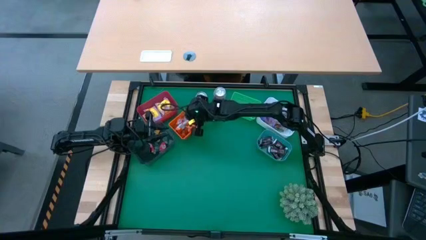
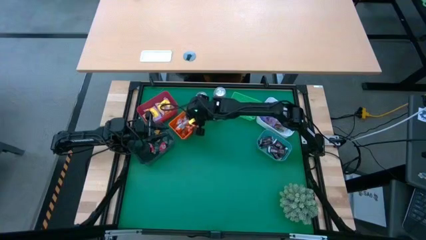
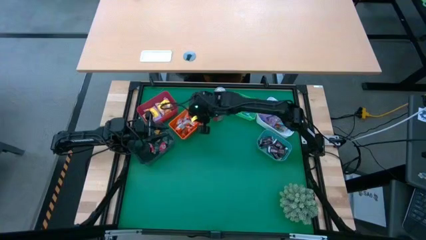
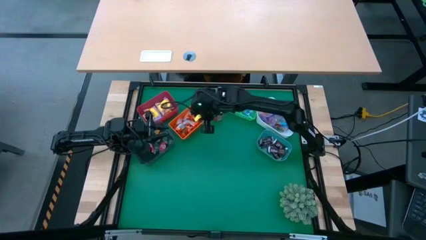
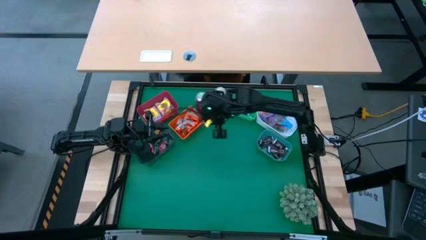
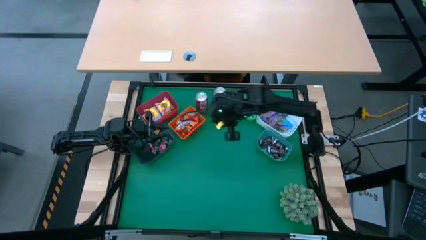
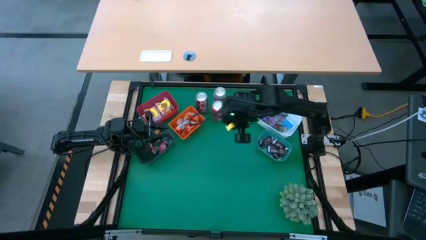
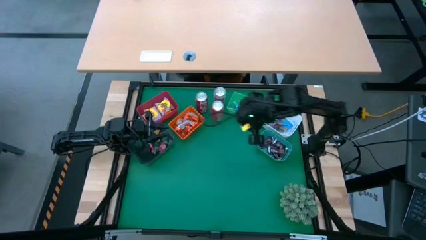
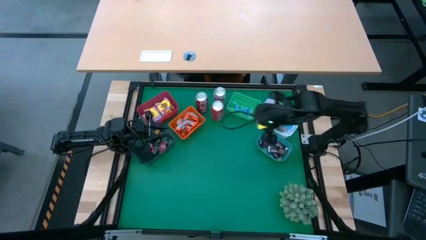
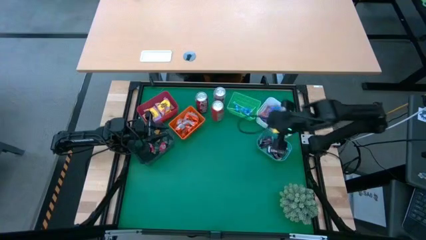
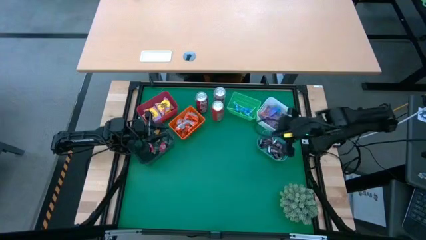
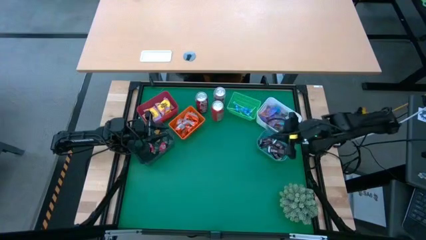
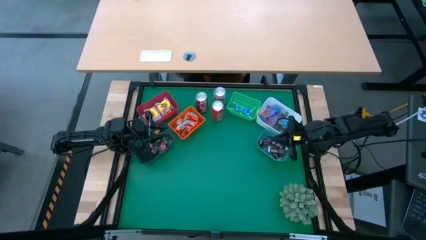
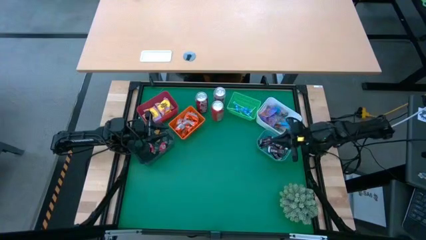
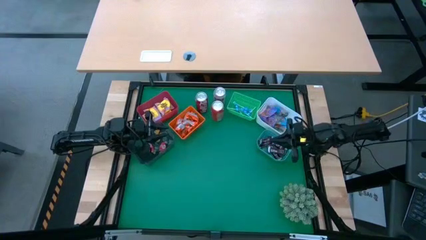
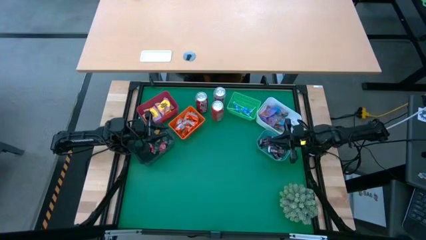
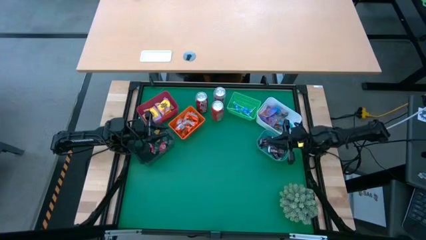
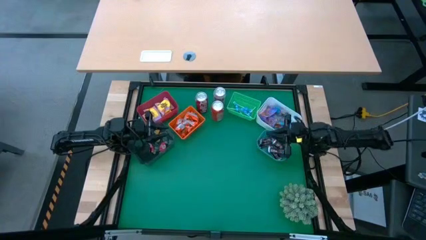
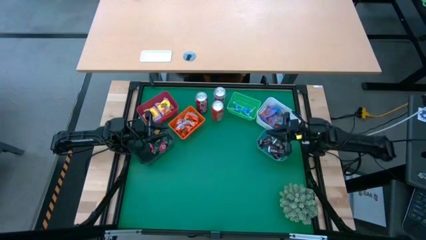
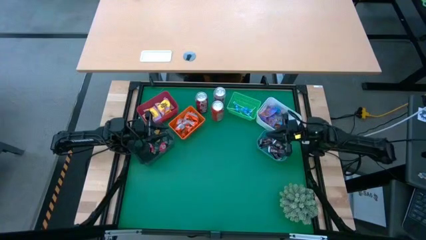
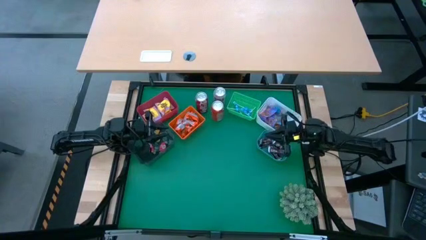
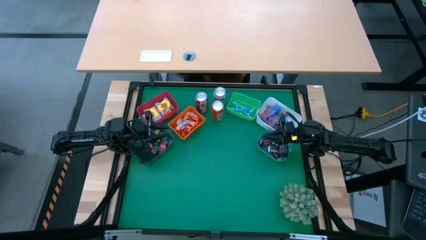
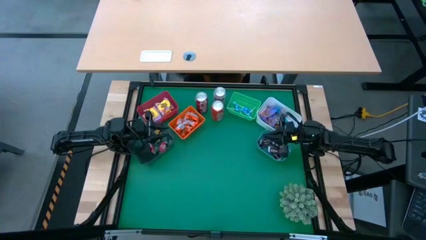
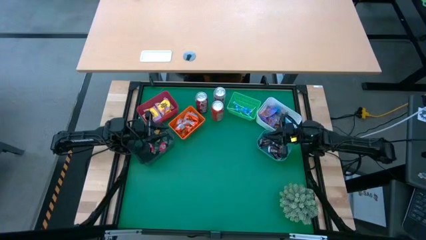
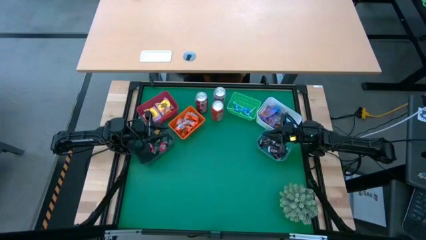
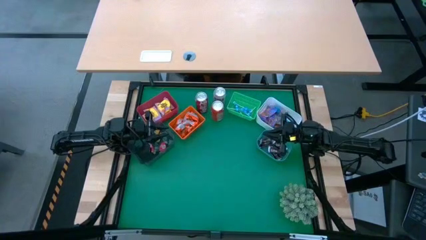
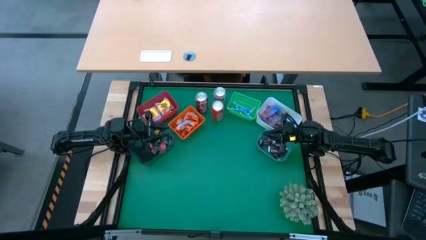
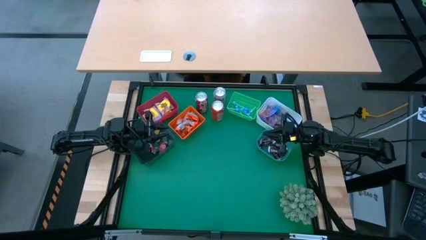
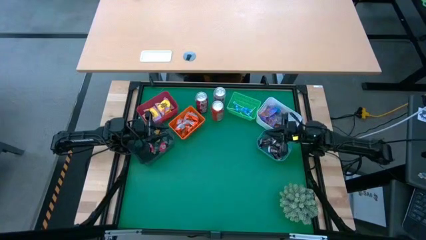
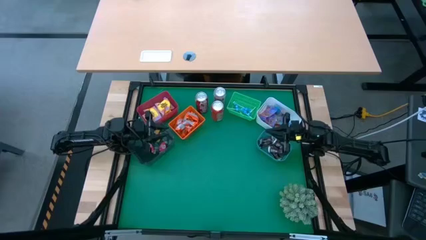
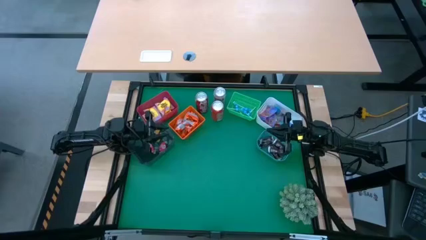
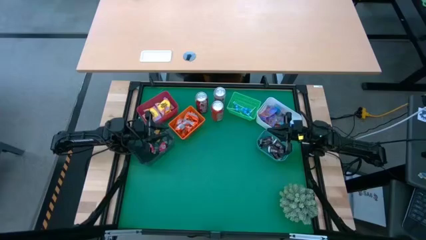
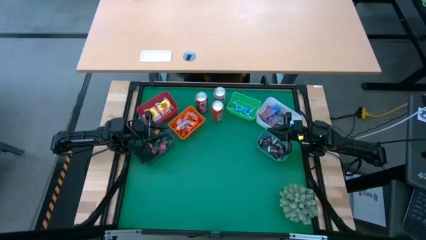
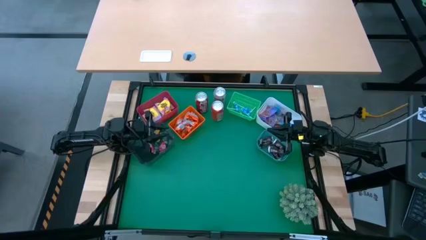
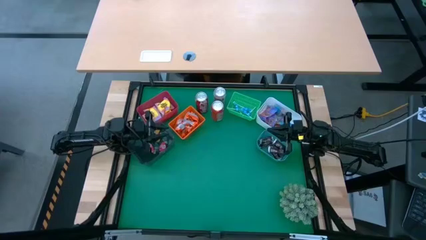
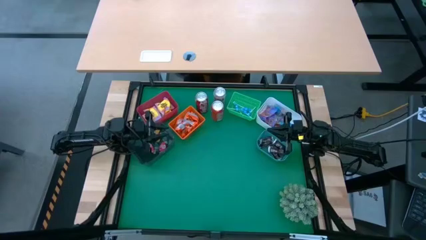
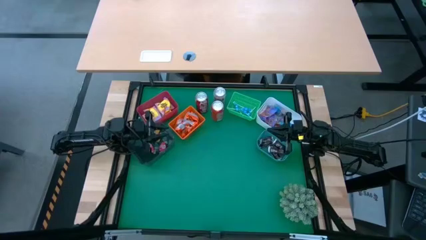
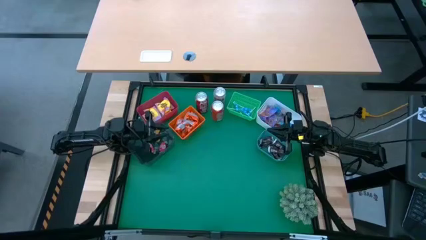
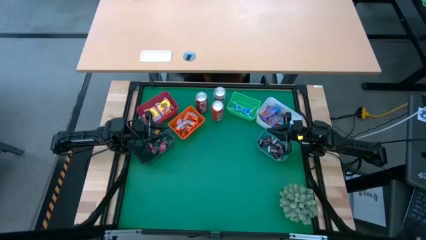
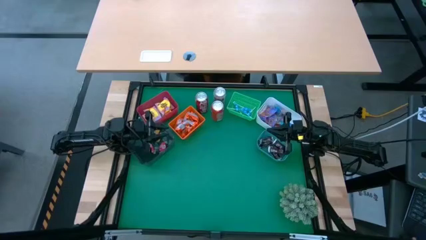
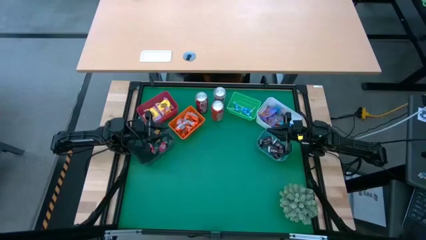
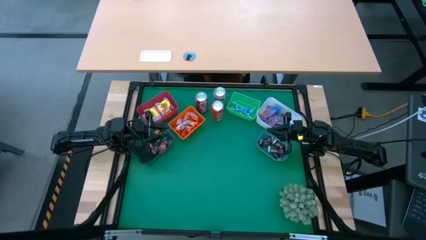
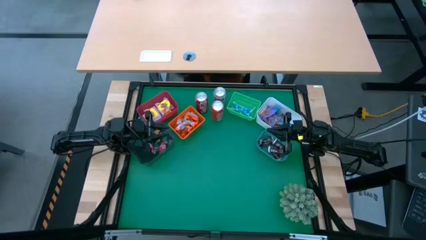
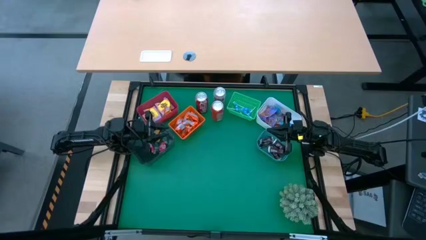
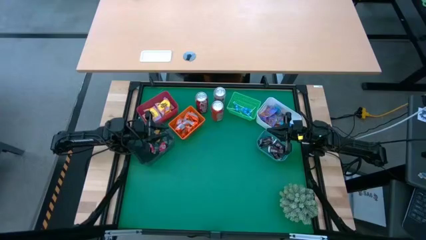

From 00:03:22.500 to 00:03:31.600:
Task: Sort candy
Return to Home Position

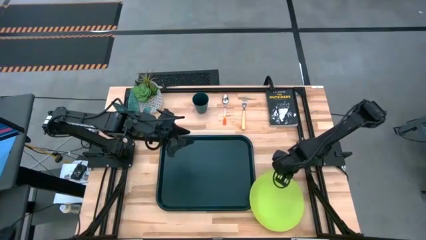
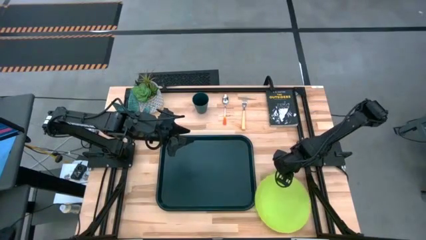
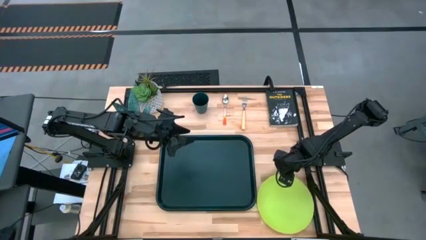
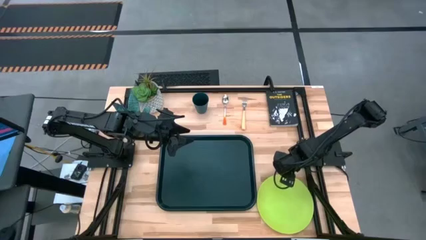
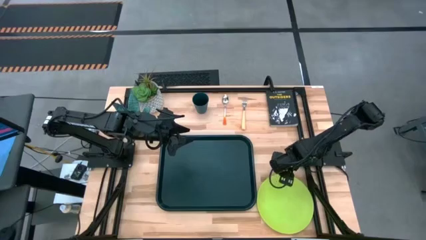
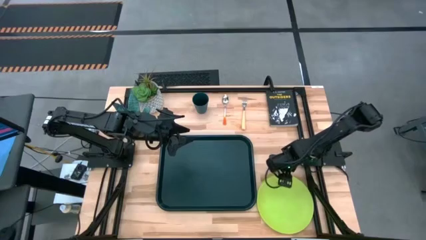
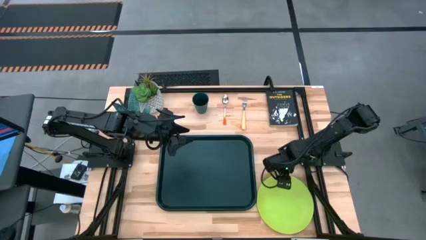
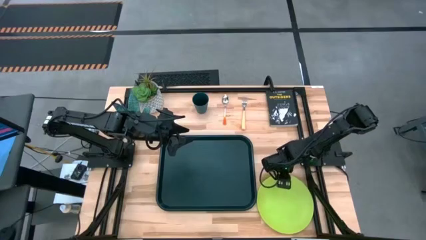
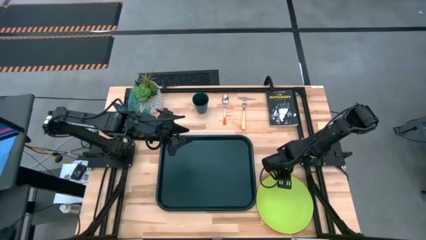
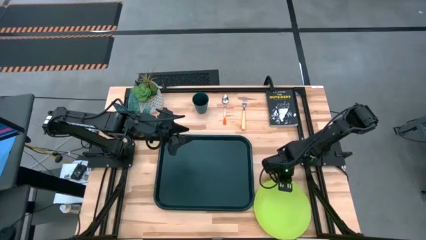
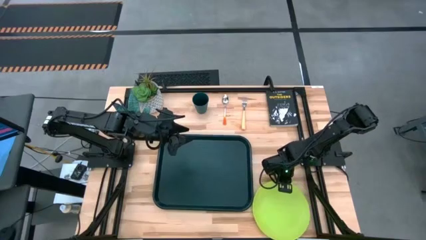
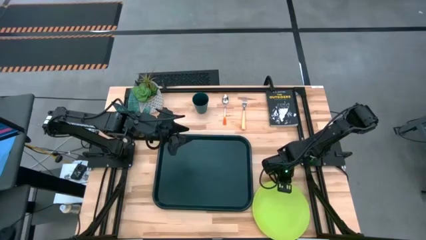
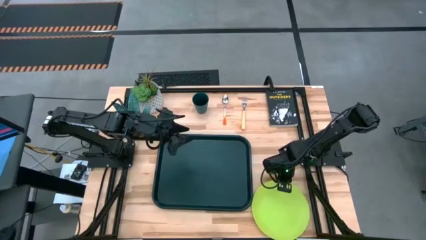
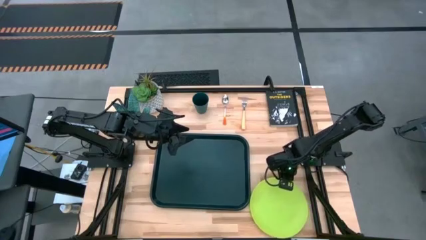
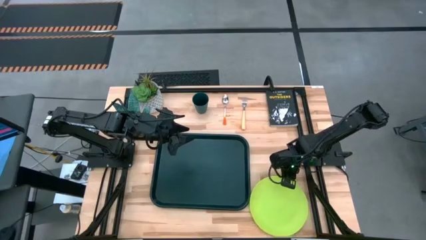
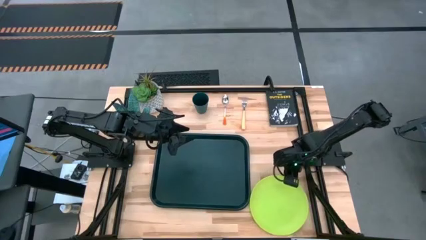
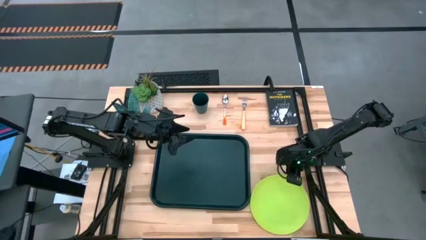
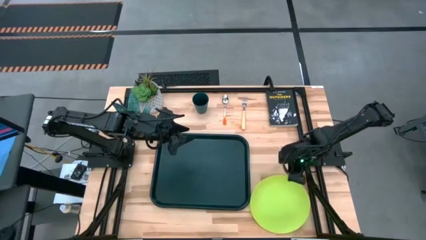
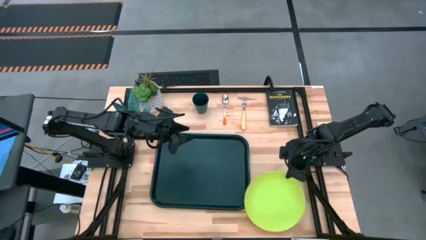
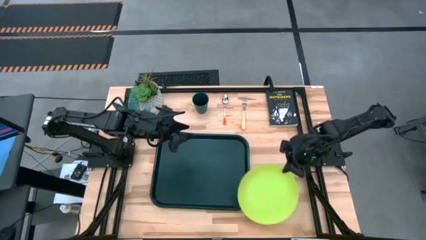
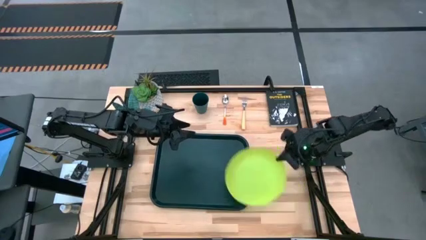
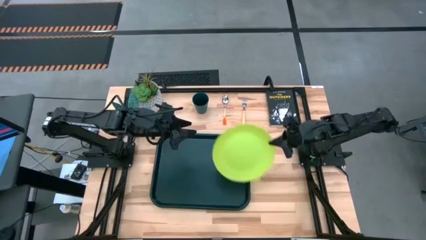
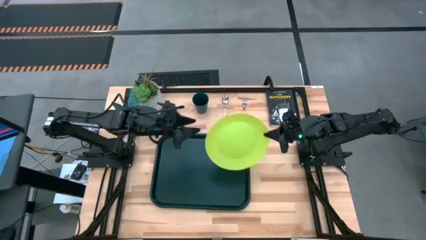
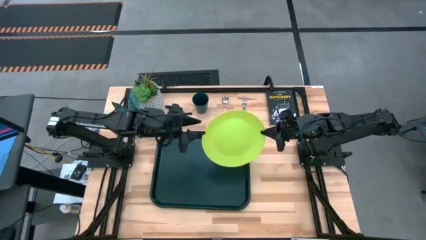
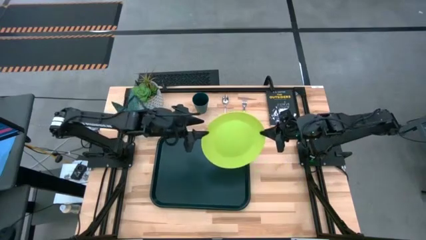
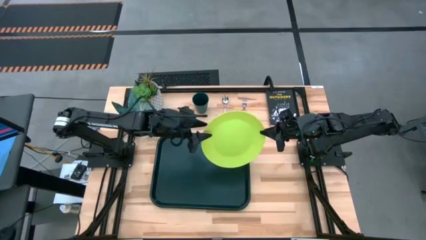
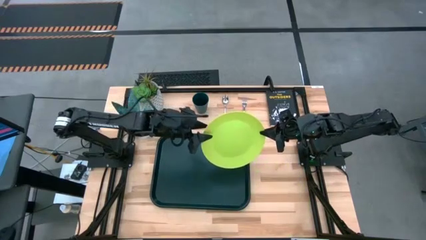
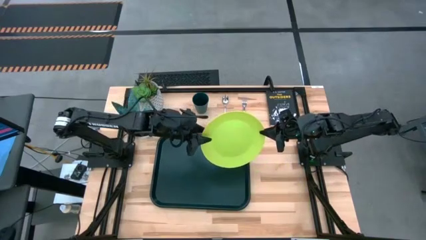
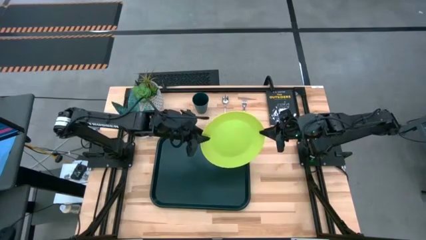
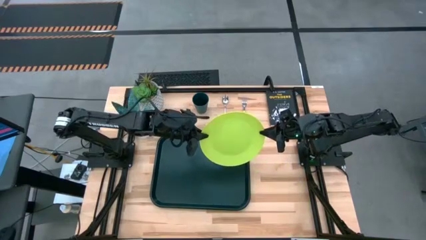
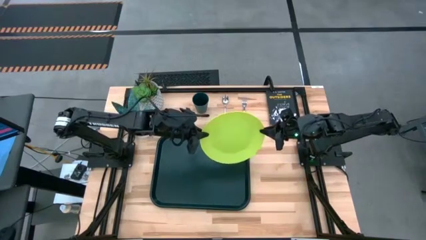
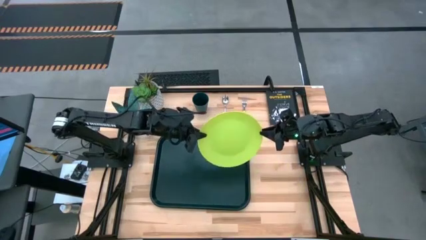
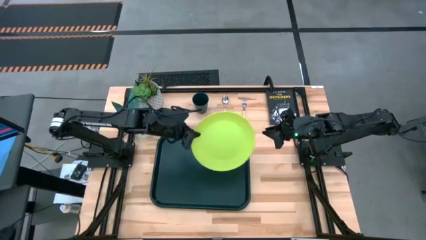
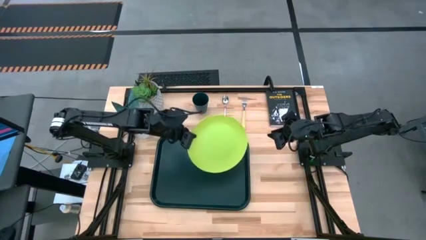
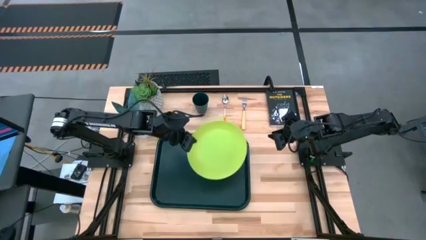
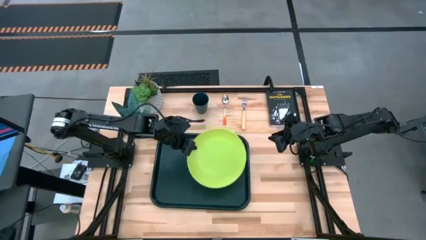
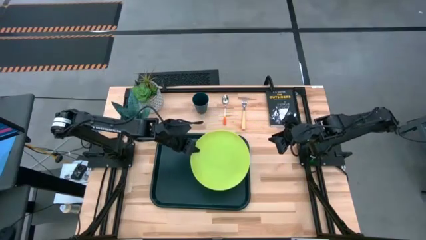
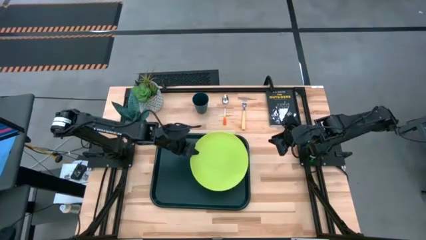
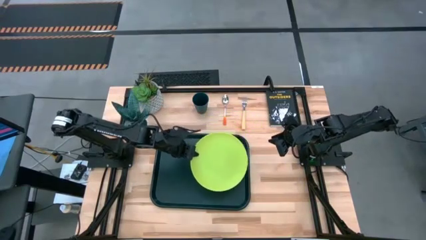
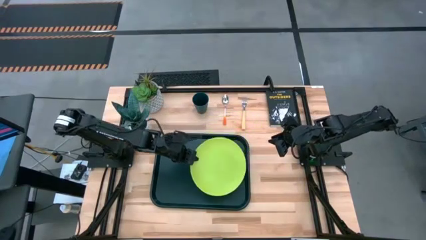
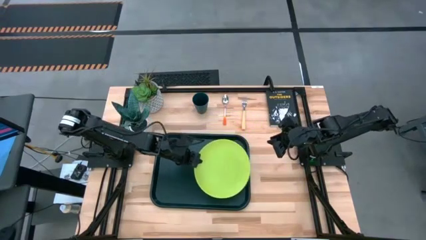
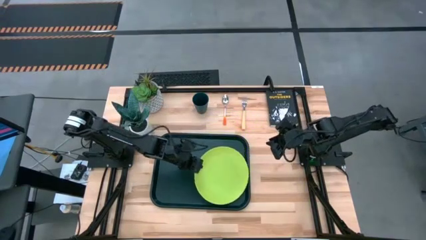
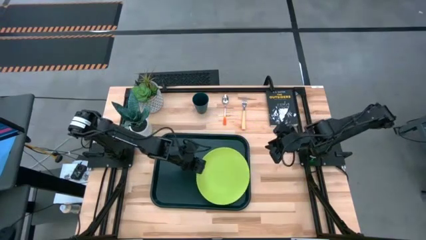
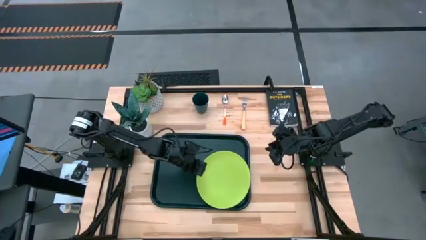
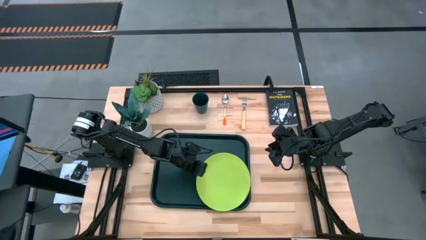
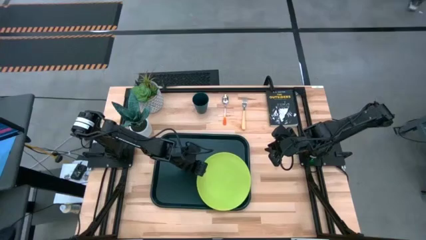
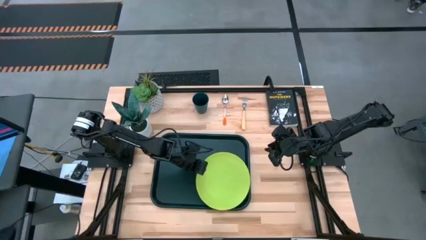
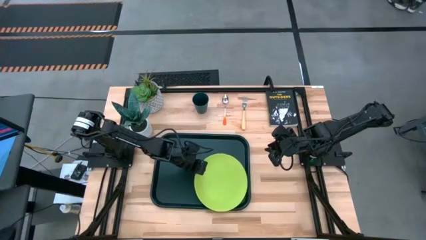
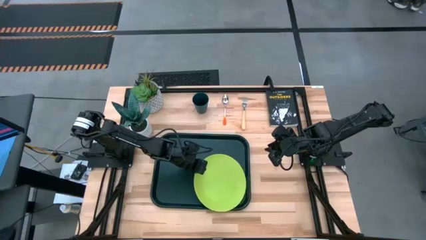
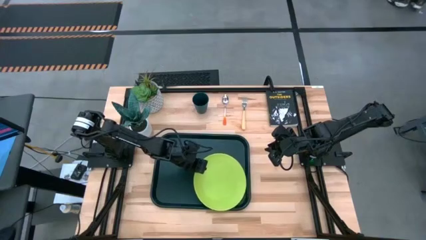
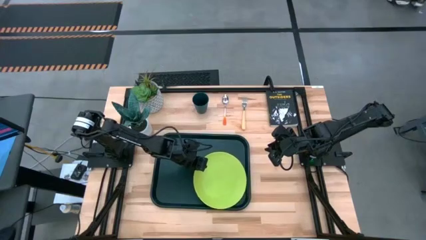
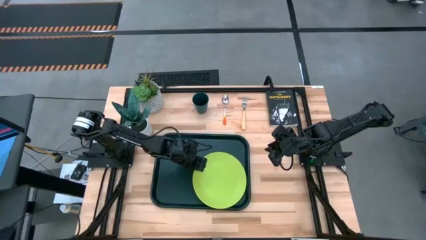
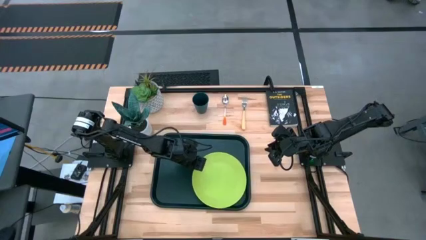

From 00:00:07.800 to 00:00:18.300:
Task: Pick and place plate/cup/fork/spoon on tray
Put the green plate to the bottom right of the black tray
